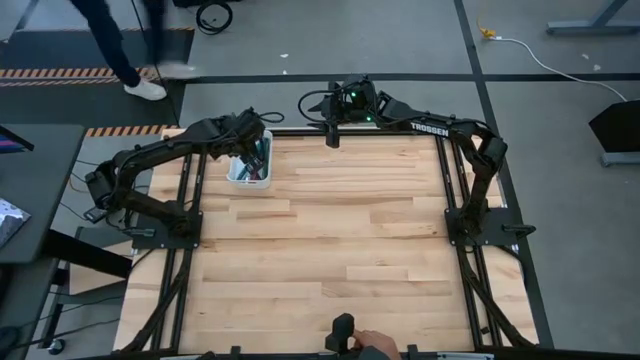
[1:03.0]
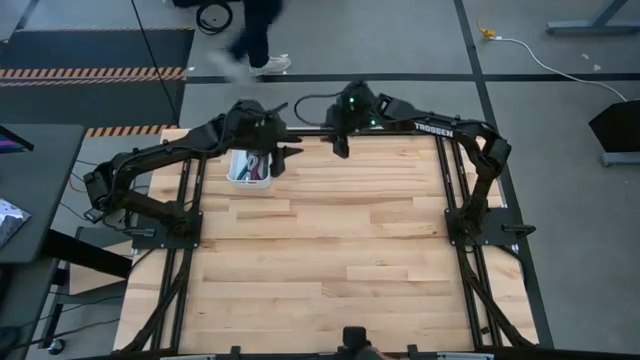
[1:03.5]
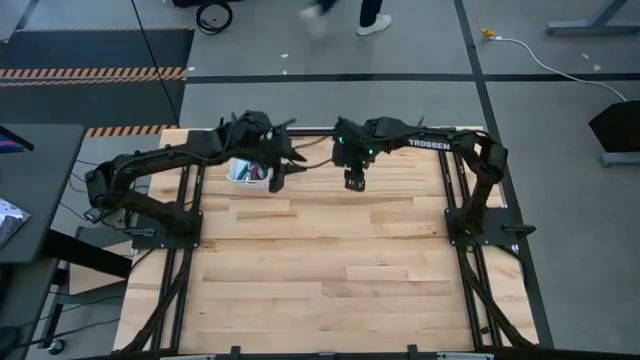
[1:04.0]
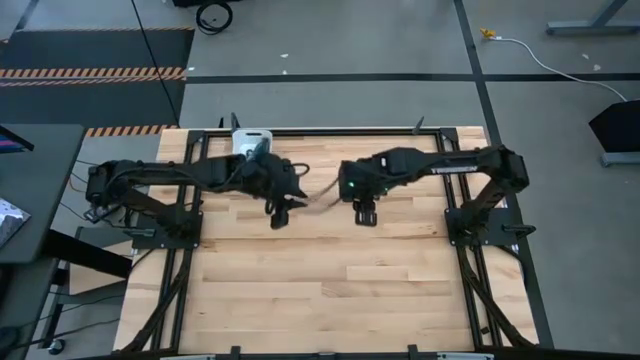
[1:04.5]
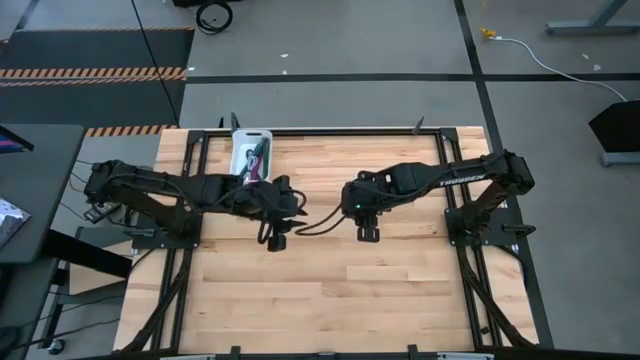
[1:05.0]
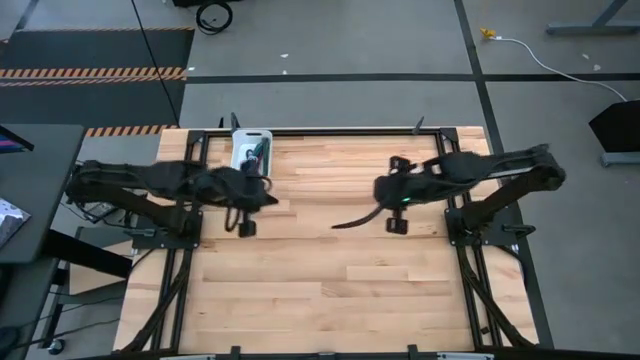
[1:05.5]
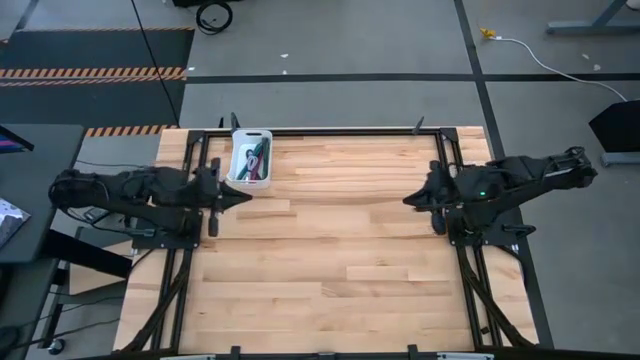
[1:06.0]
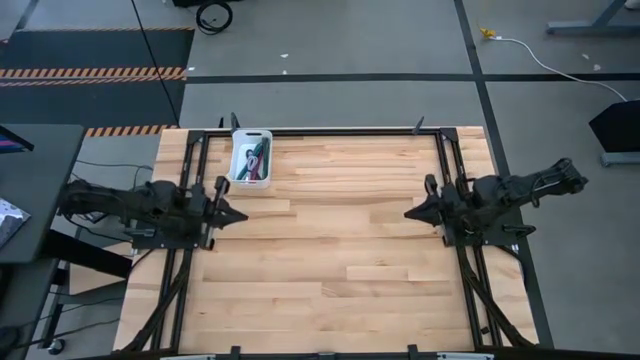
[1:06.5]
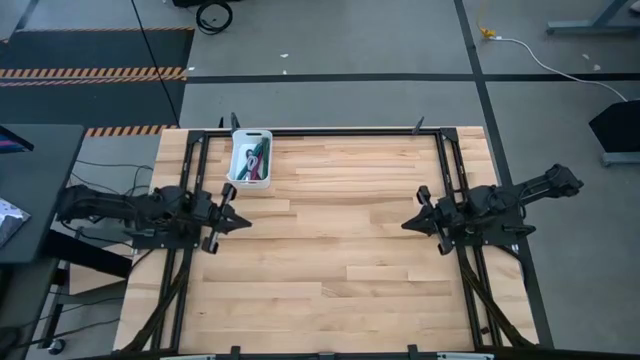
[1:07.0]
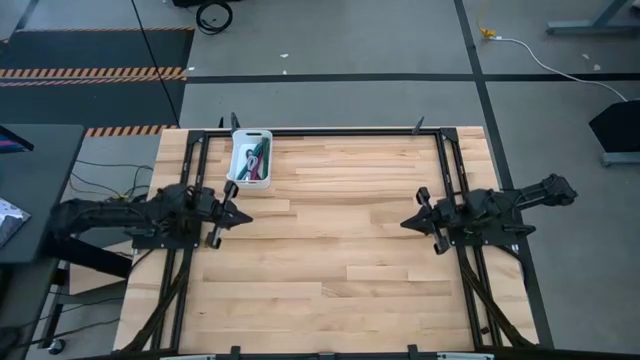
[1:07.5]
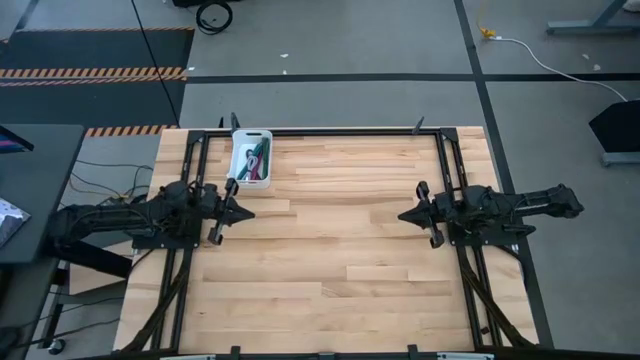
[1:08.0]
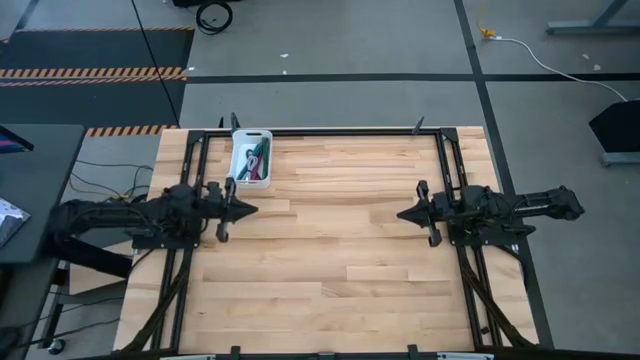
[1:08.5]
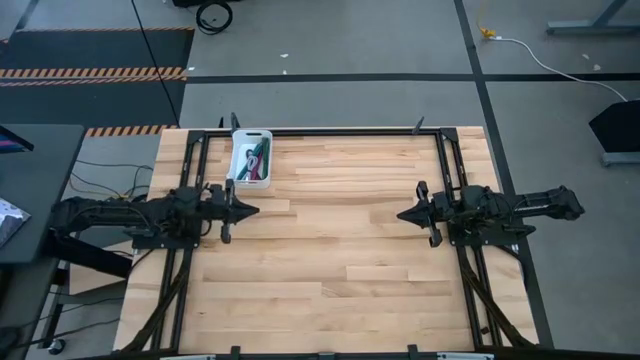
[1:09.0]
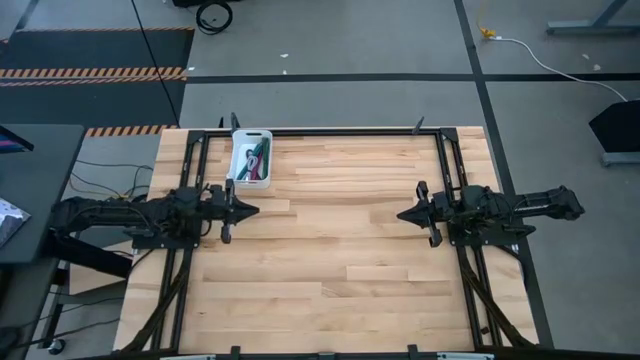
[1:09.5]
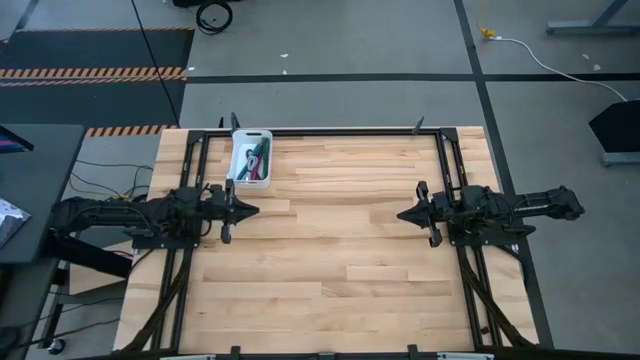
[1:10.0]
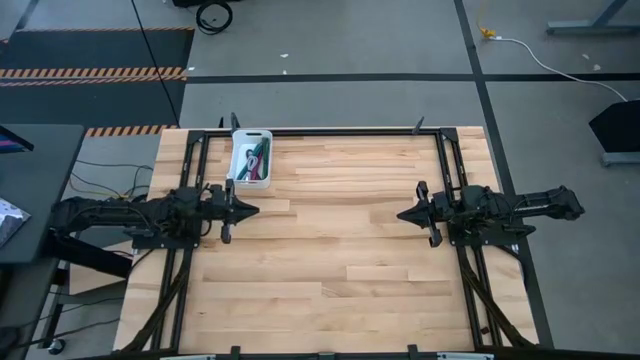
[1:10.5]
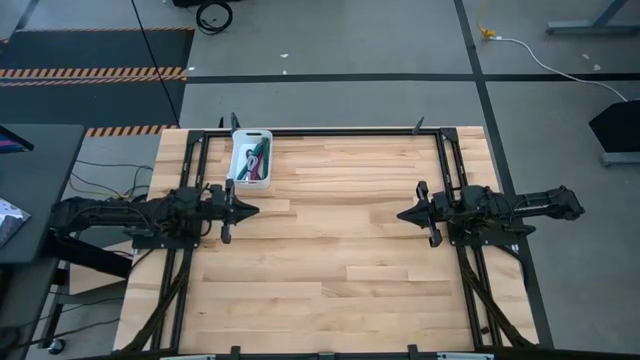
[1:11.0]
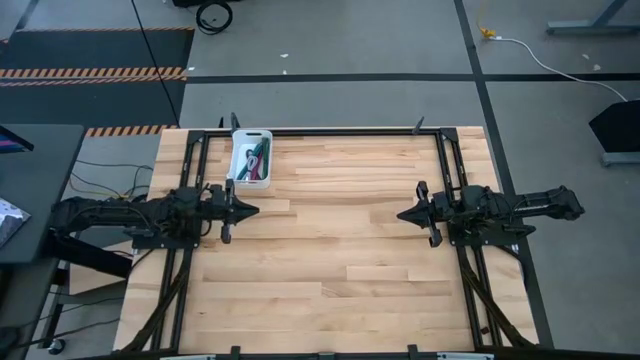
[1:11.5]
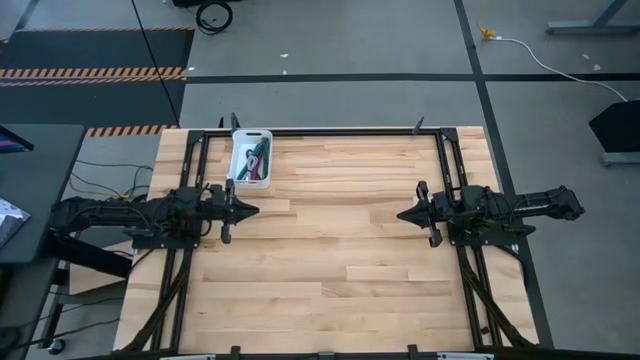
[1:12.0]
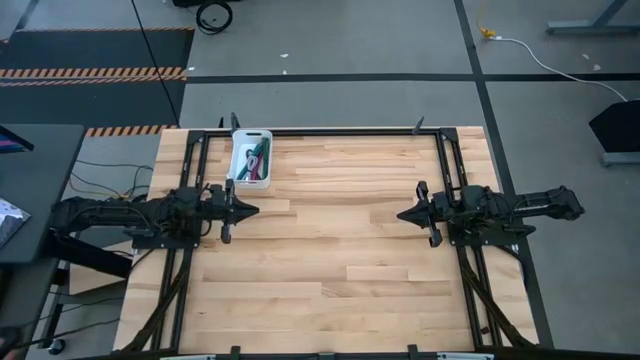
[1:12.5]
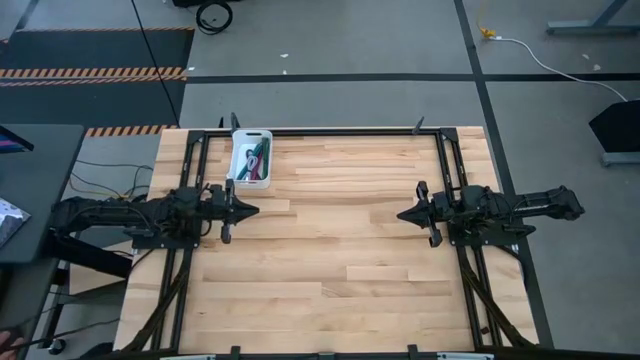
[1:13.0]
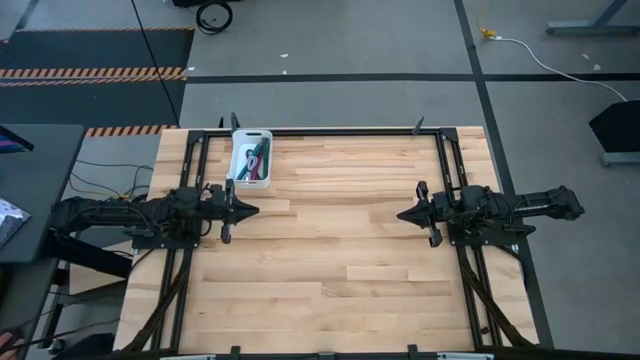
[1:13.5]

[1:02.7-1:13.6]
Task: Pick and place USB-C Cables
Return to Home Position

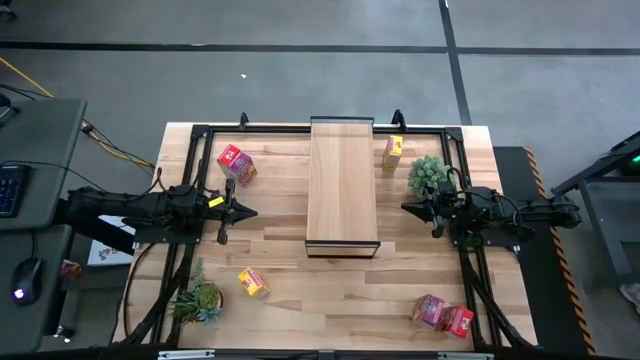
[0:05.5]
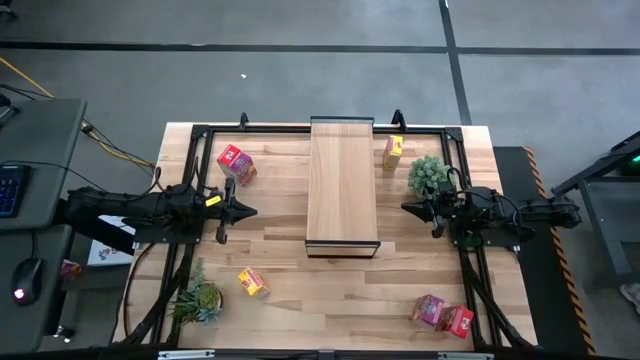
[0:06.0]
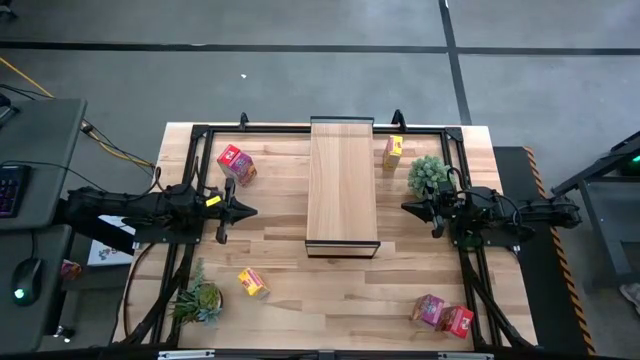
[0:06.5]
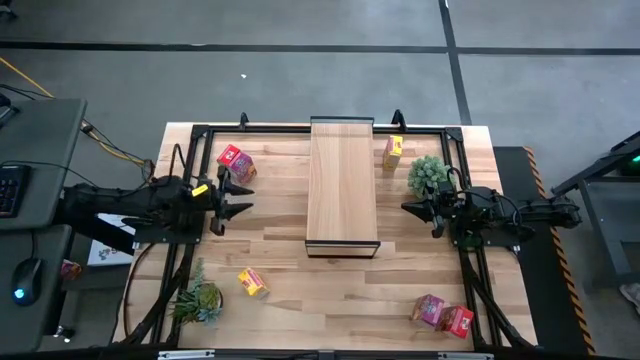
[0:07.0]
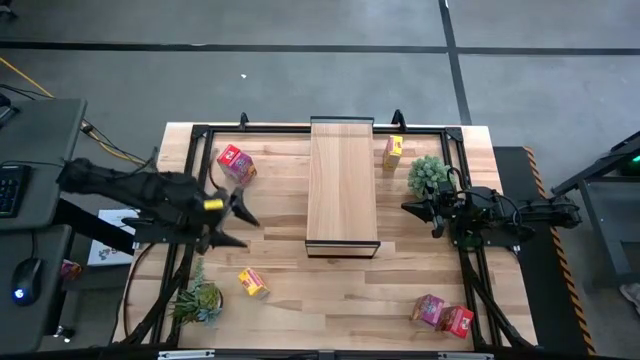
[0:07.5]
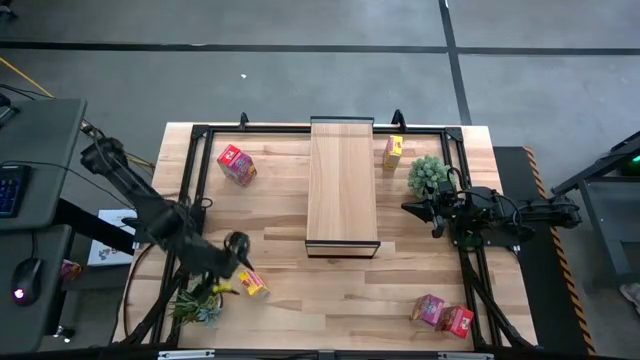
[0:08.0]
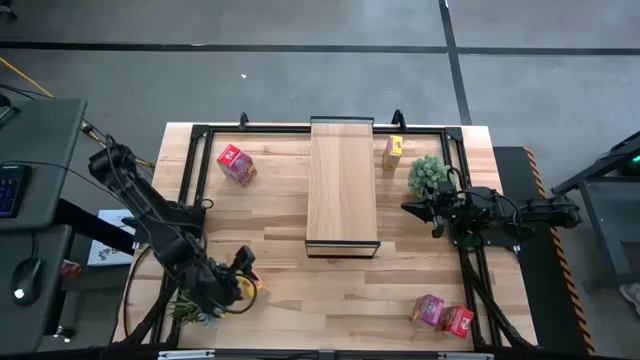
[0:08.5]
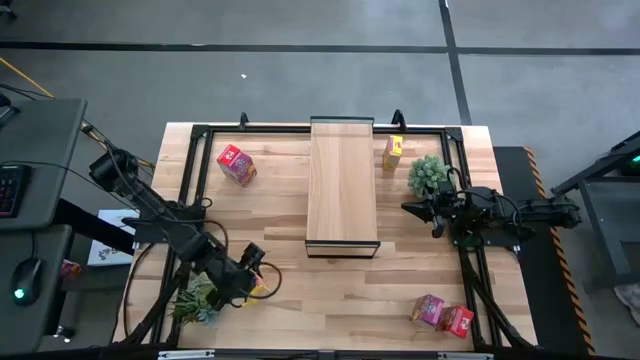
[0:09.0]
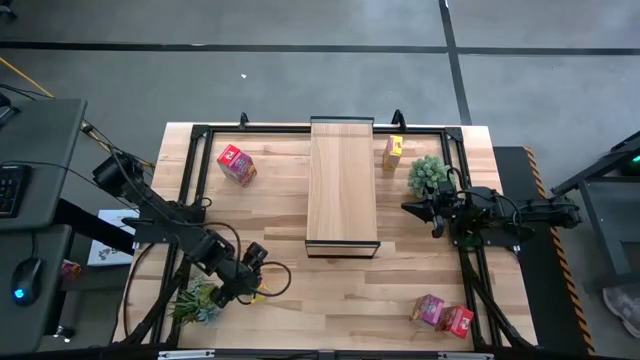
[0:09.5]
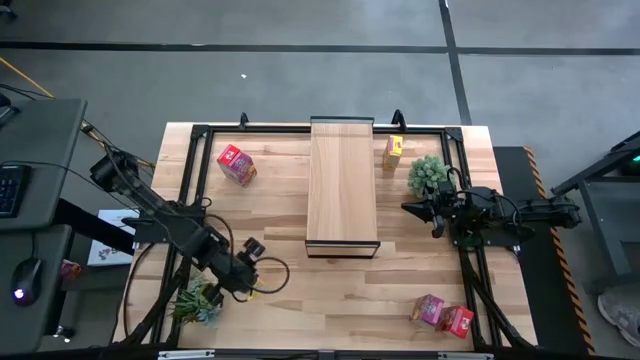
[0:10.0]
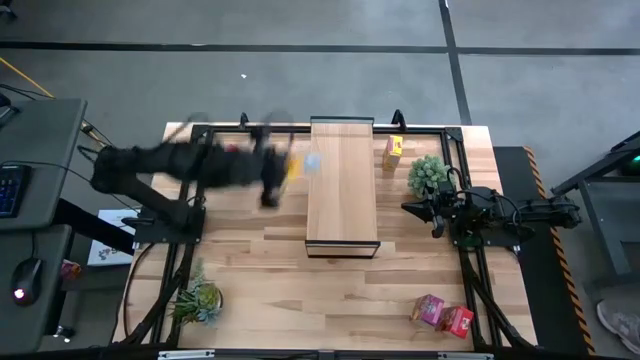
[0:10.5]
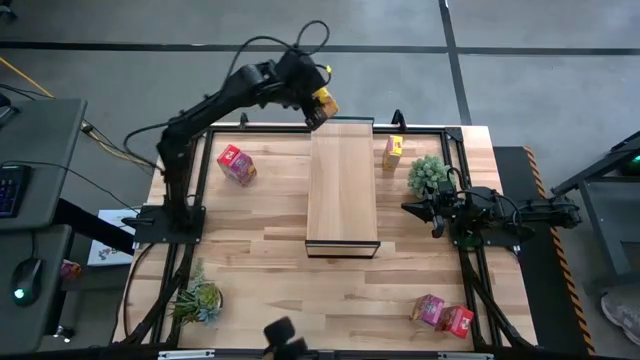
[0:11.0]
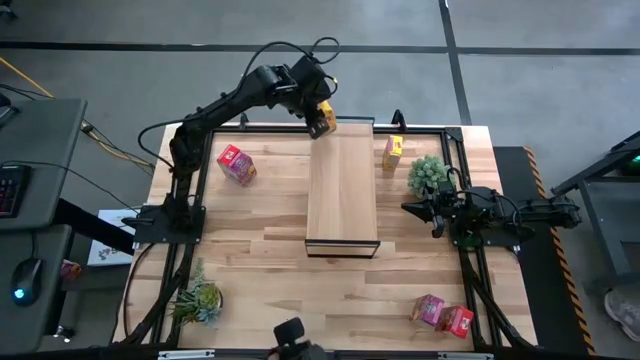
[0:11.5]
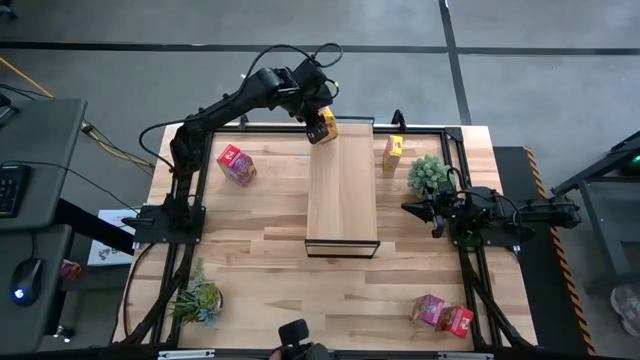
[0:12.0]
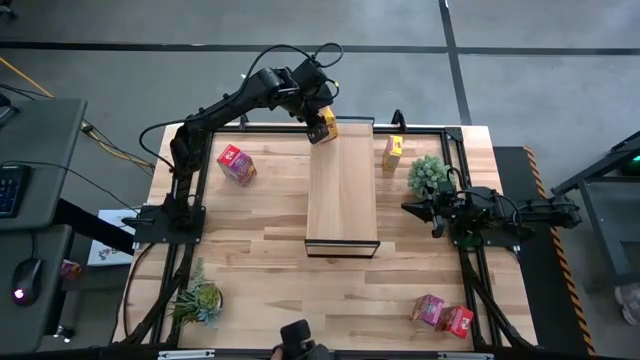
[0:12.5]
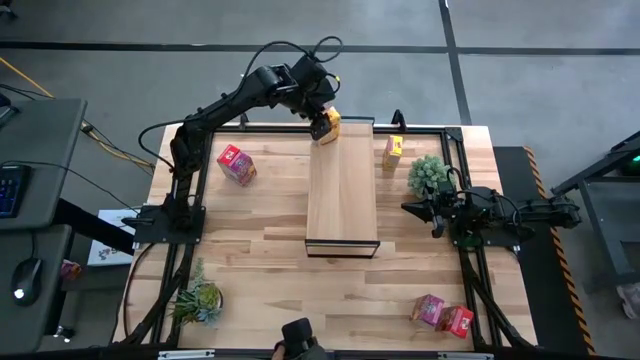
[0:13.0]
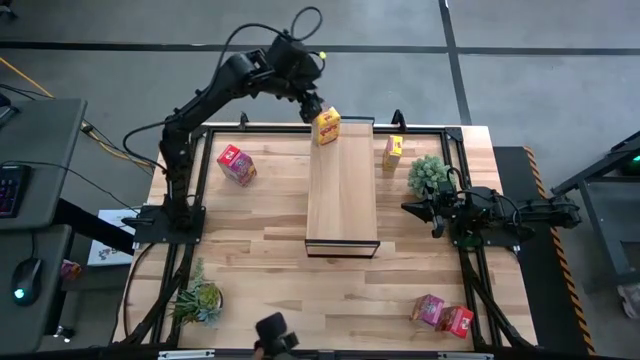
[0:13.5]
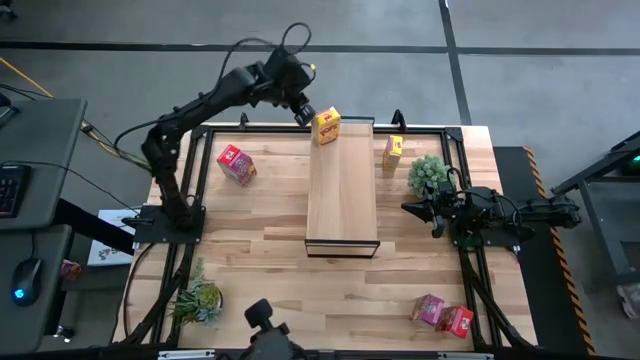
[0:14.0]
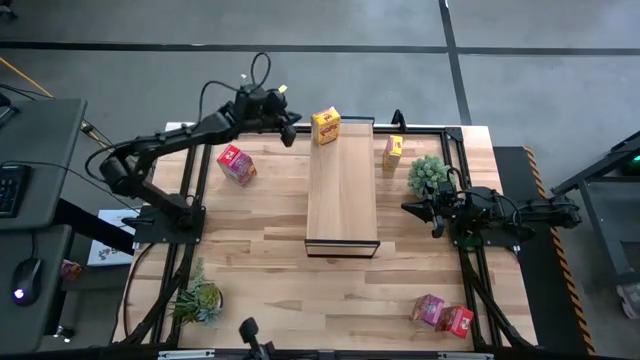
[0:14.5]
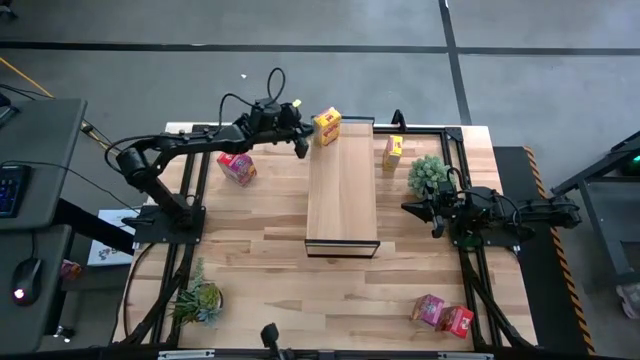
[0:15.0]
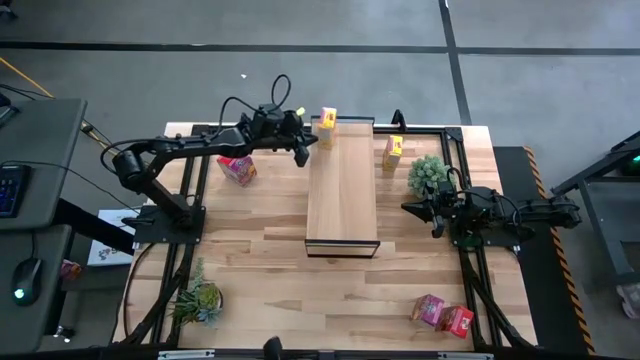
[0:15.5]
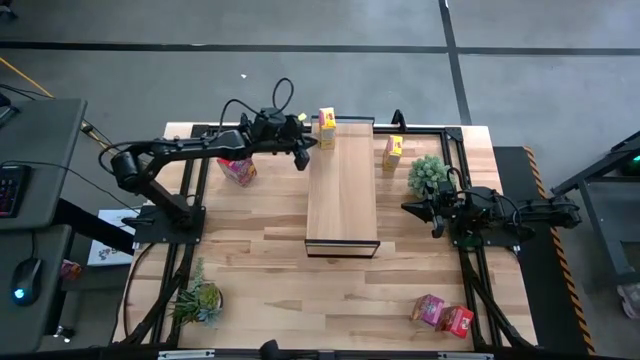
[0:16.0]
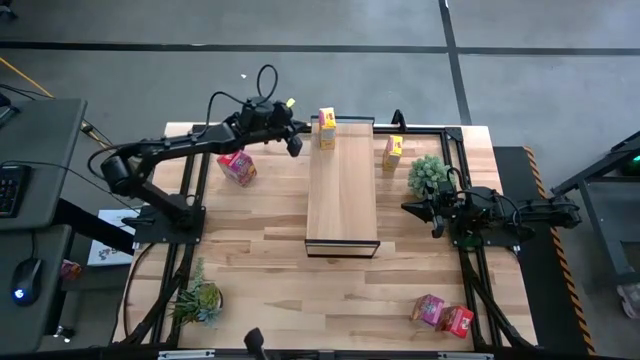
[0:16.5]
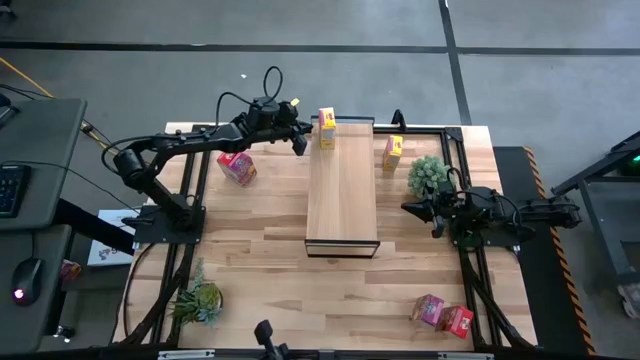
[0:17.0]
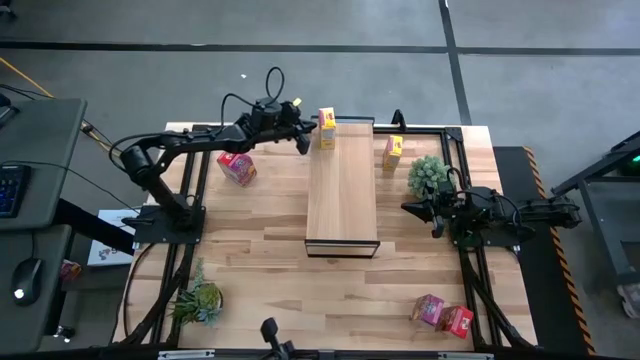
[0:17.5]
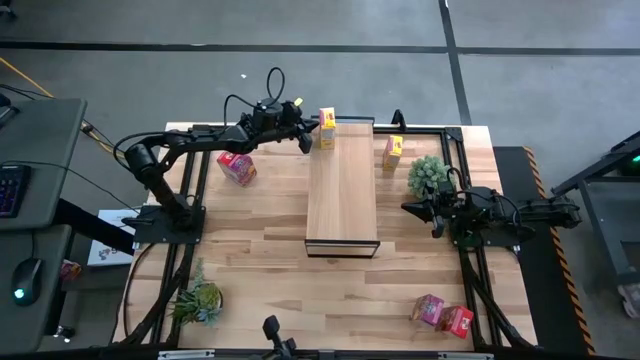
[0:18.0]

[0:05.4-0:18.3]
Task: Stack cereal on shelf
Put the bottom yellow cereal box on the shelf
